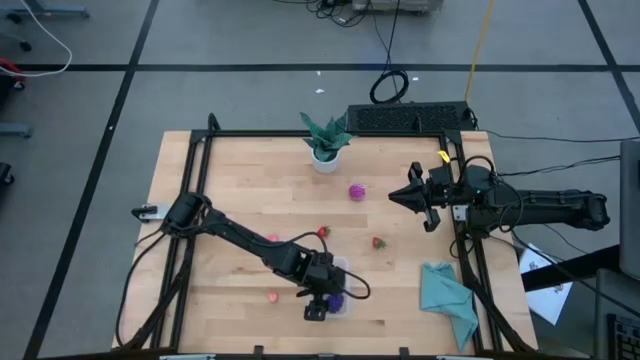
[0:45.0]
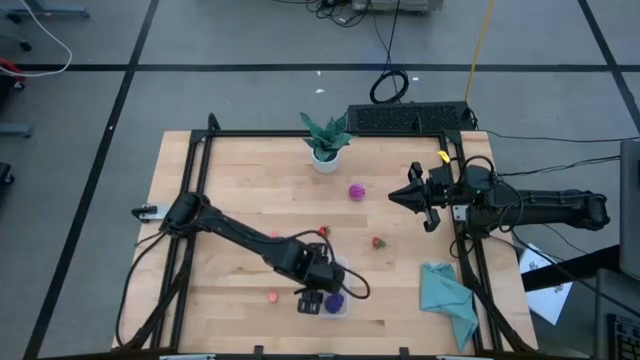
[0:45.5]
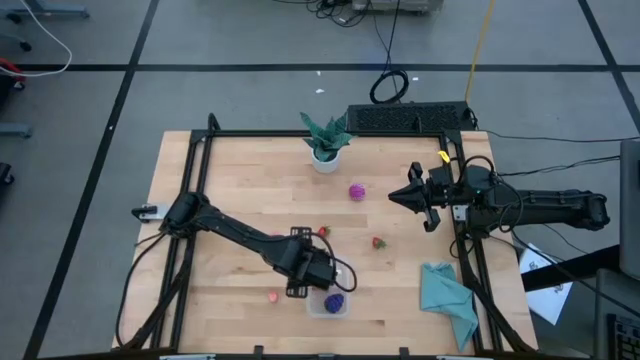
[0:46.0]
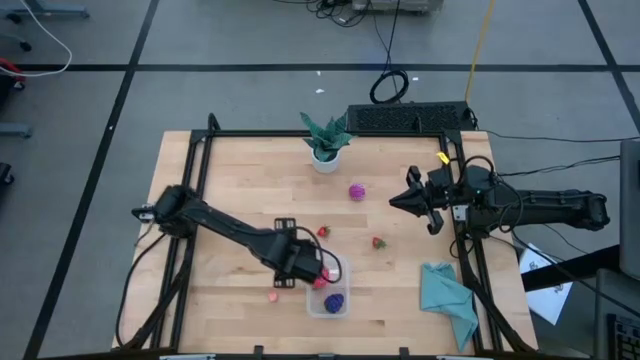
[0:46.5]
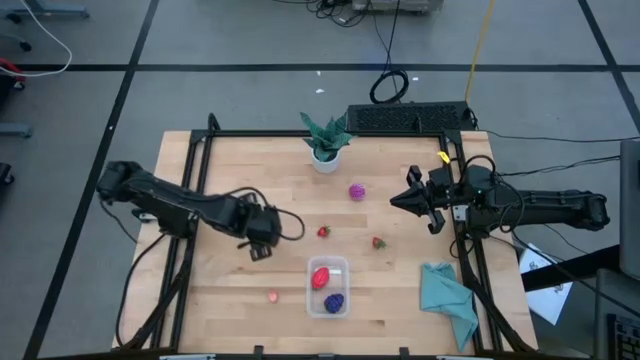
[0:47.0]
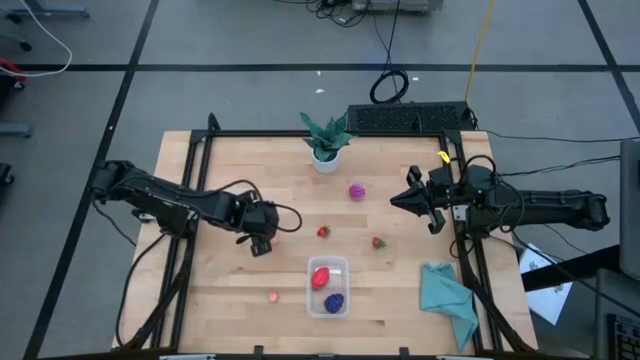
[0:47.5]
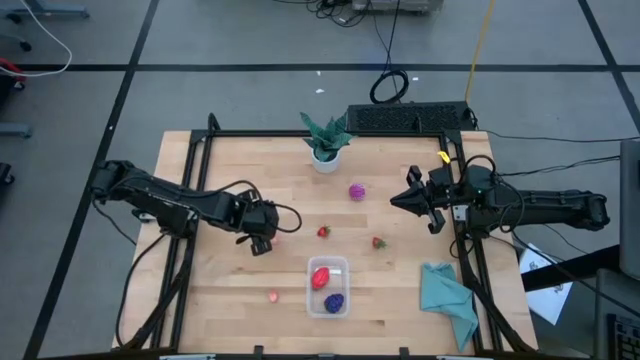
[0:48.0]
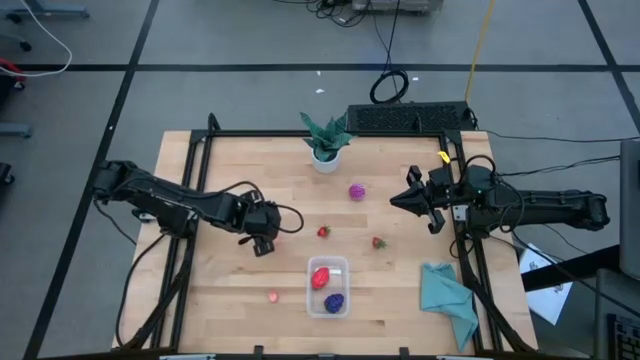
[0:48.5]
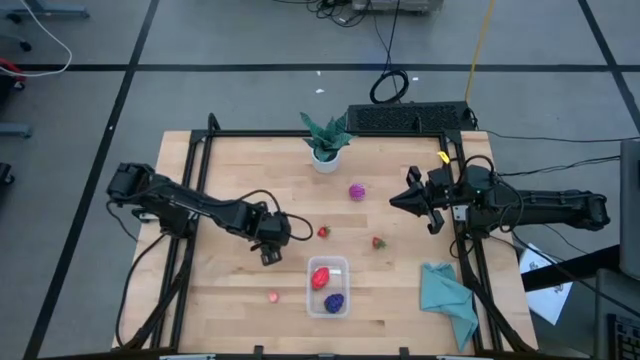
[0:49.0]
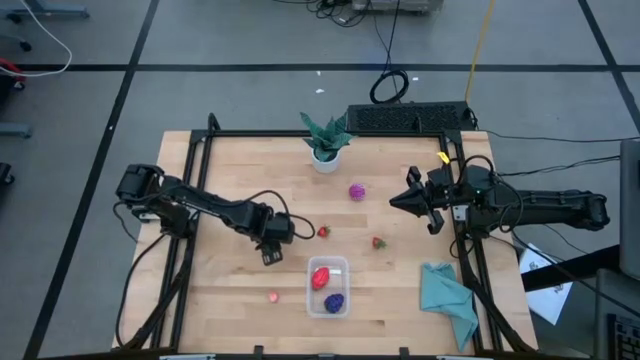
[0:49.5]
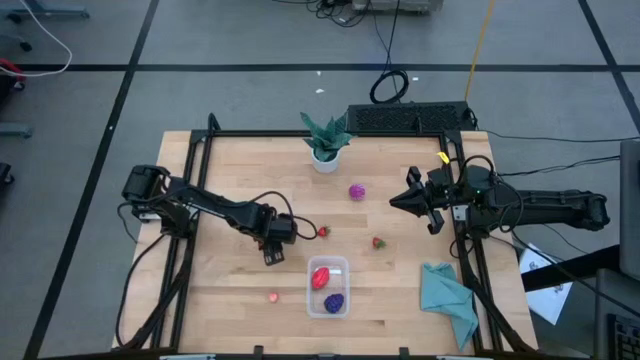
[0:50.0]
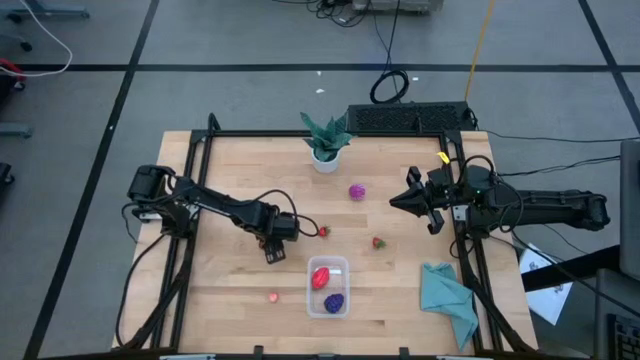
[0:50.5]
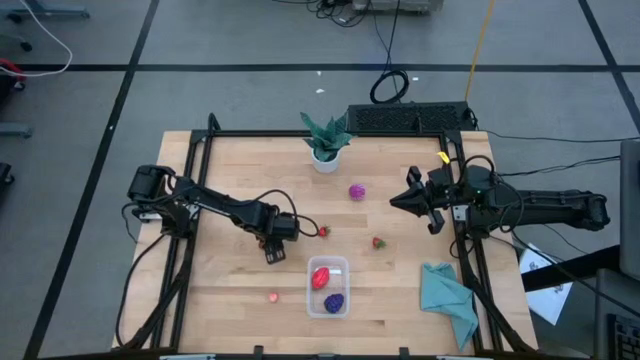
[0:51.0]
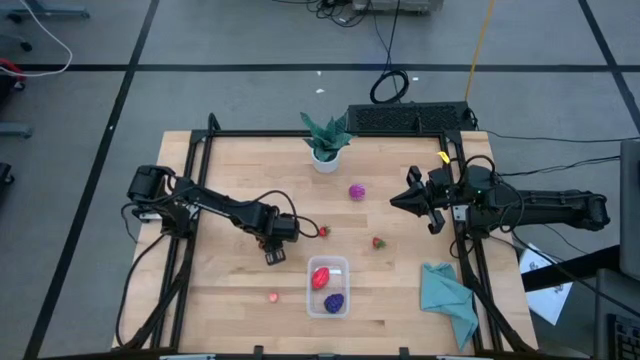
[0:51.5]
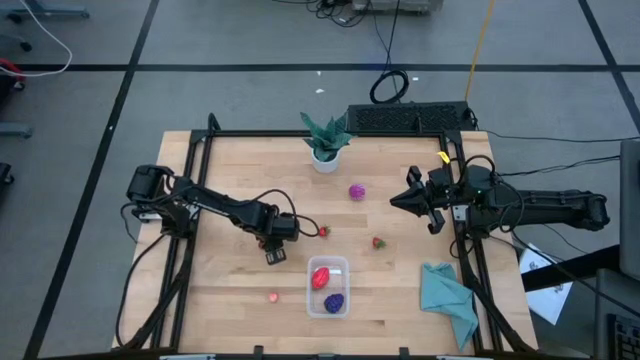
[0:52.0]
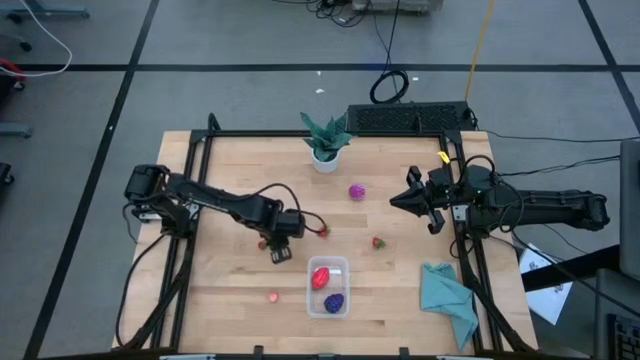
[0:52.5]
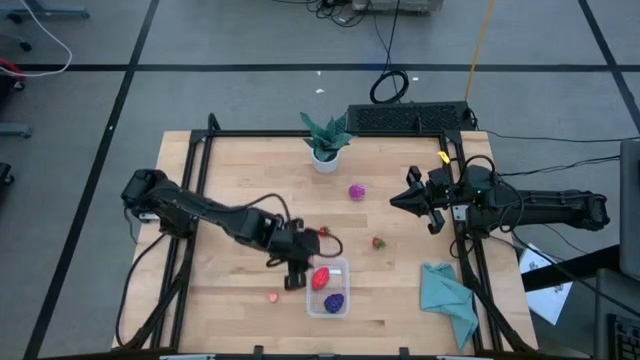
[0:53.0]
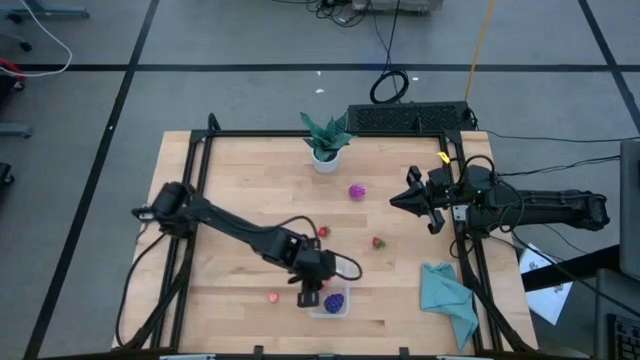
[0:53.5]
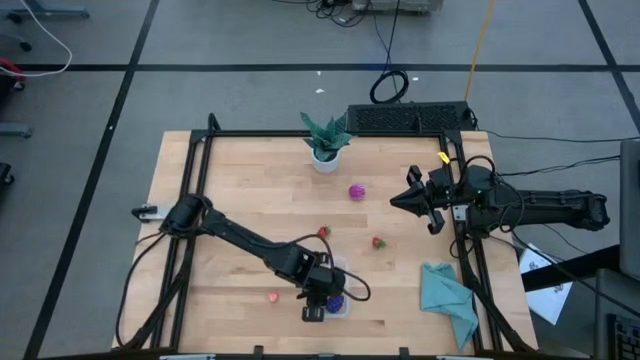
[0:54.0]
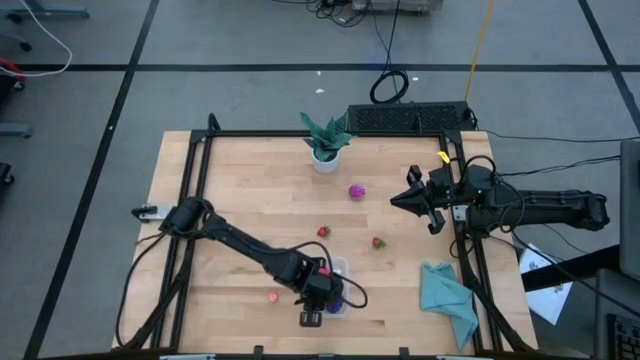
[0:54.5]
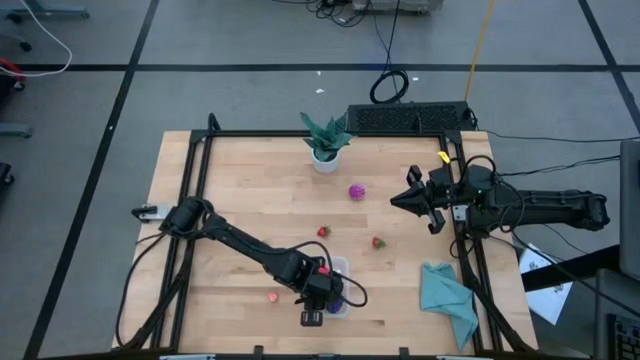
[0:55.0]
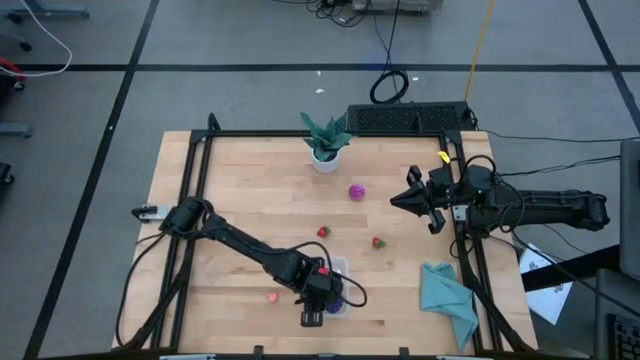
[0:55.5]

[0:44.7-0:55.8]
Task: Pick and placing Produce into tupperware
Put the top pink peach into the transparent container

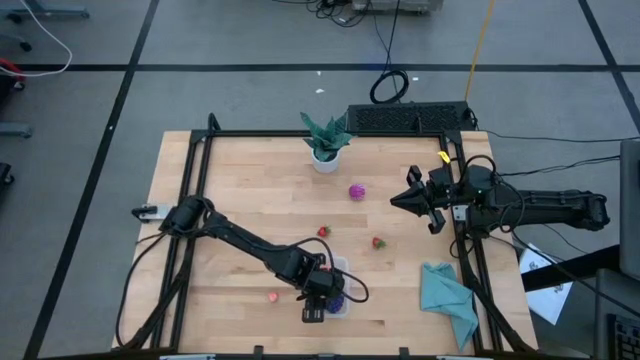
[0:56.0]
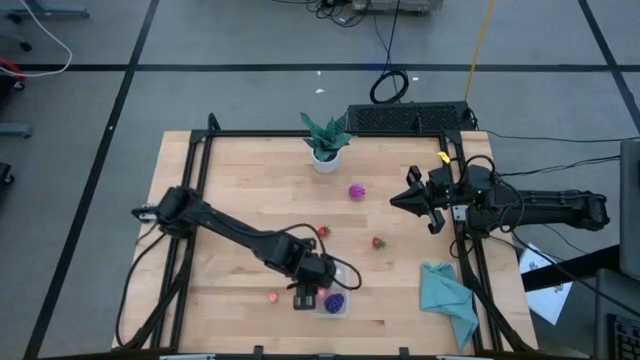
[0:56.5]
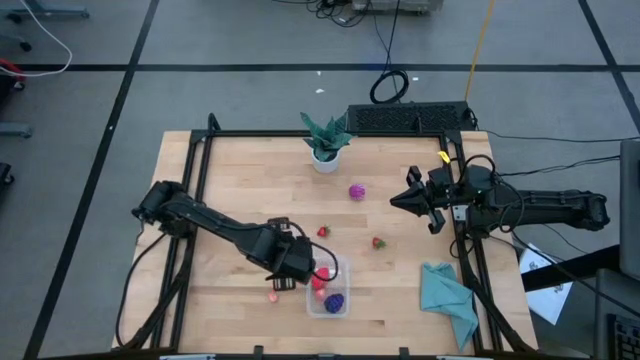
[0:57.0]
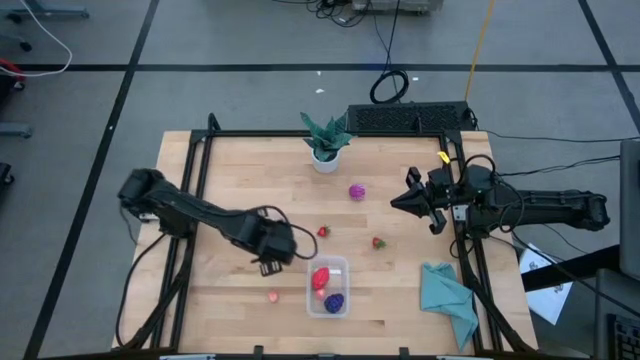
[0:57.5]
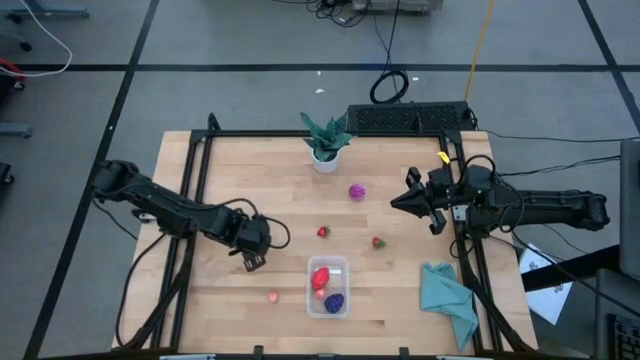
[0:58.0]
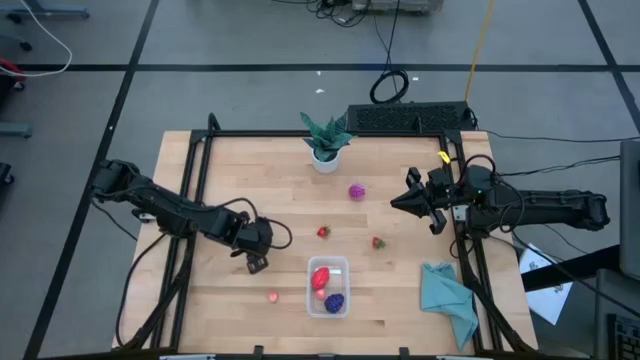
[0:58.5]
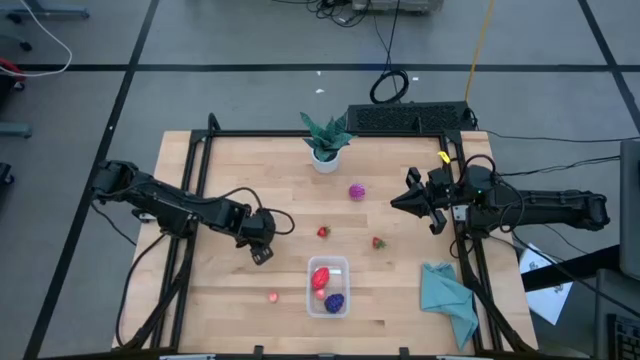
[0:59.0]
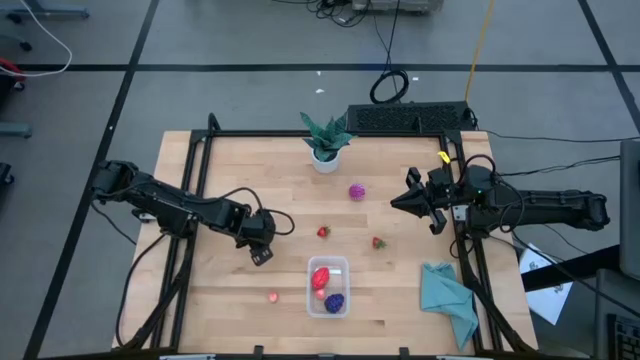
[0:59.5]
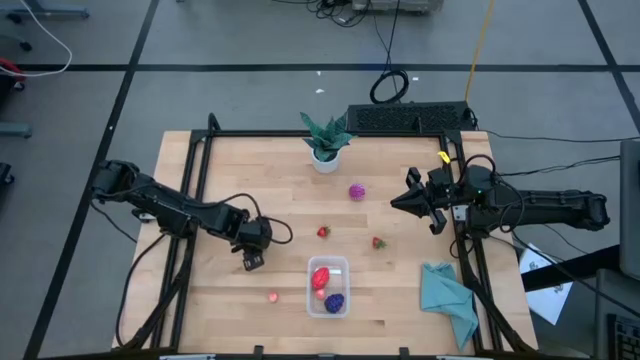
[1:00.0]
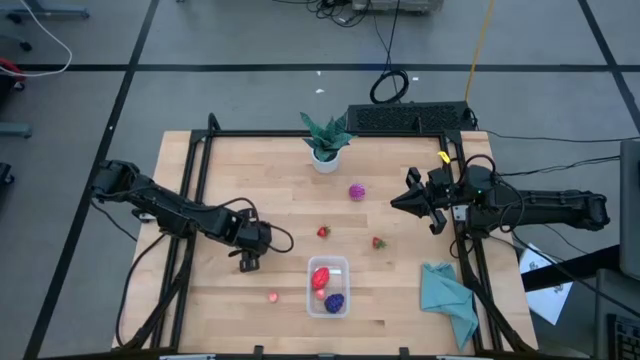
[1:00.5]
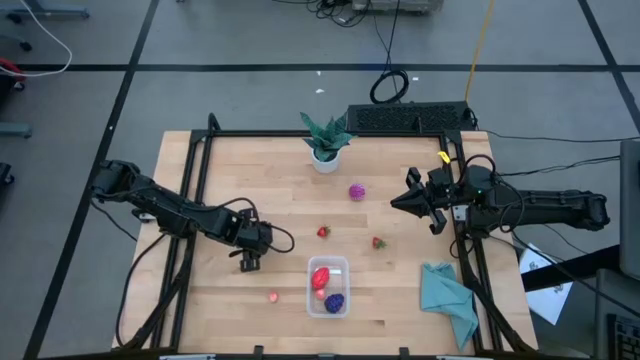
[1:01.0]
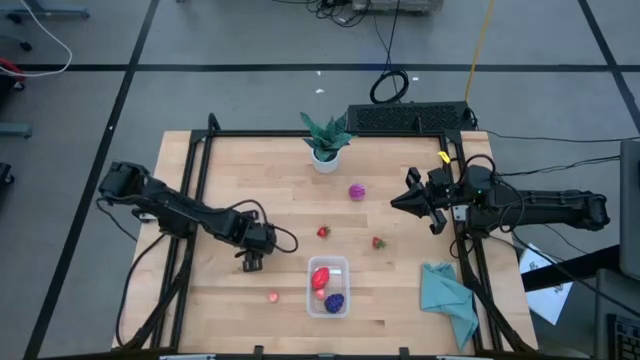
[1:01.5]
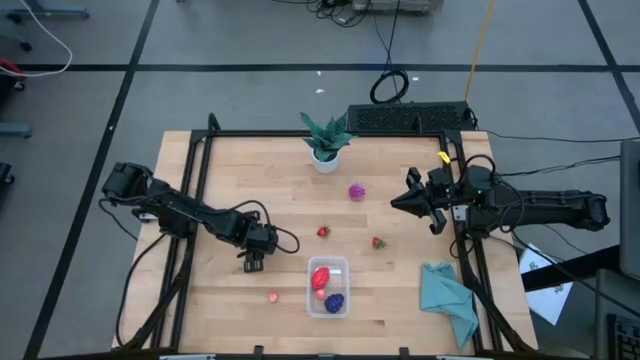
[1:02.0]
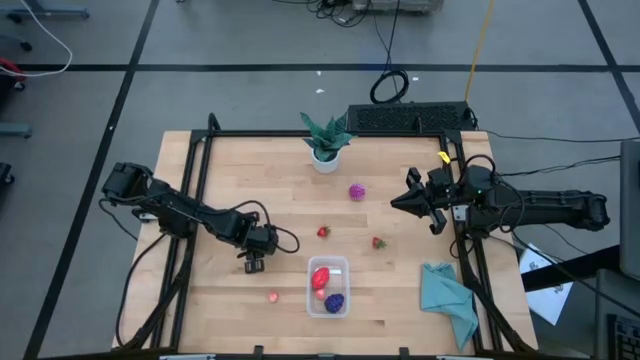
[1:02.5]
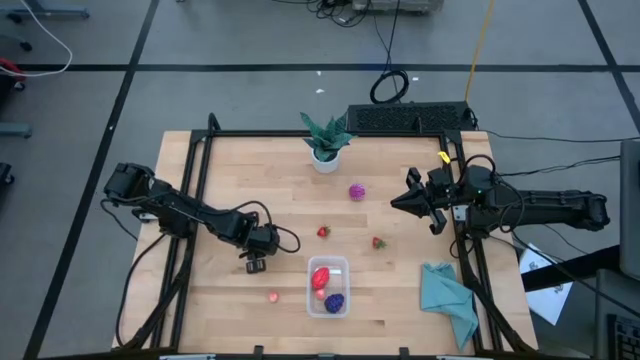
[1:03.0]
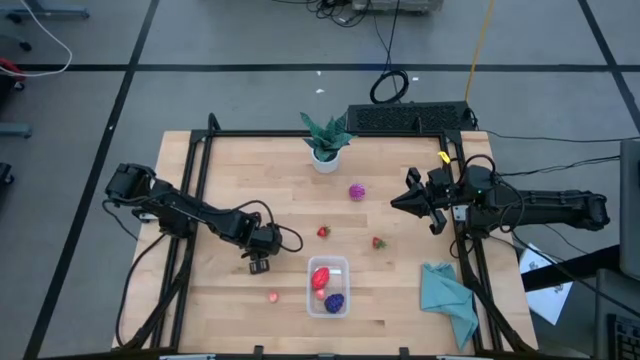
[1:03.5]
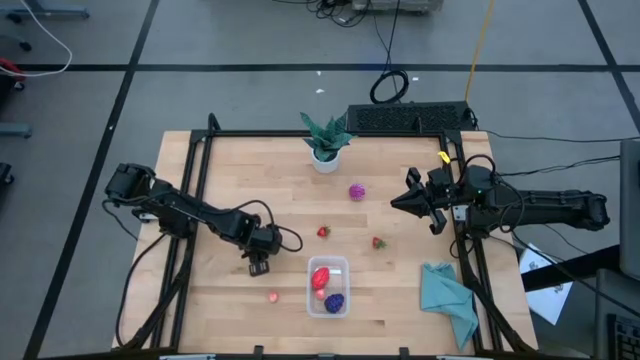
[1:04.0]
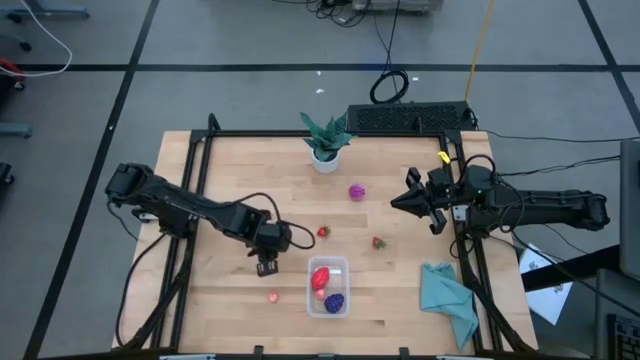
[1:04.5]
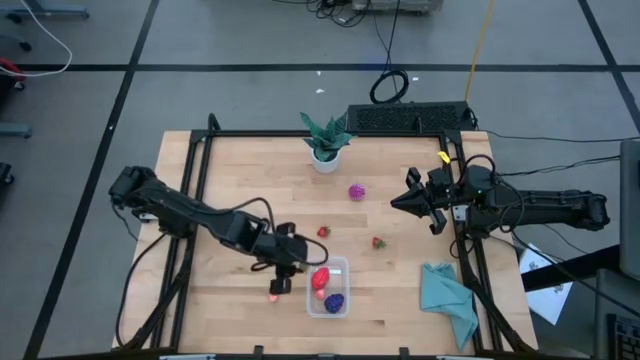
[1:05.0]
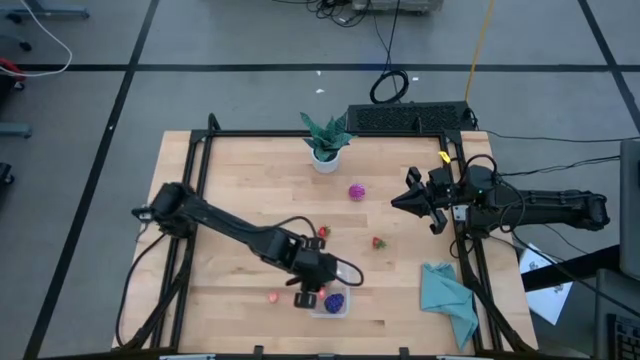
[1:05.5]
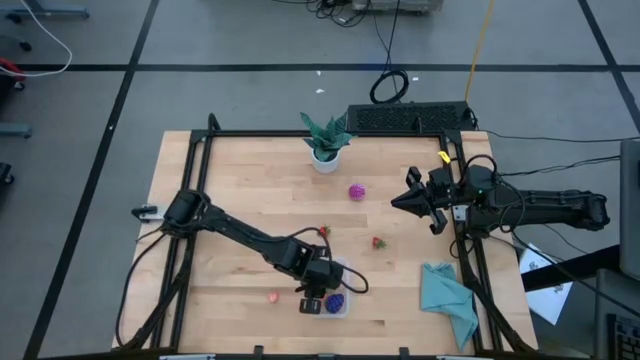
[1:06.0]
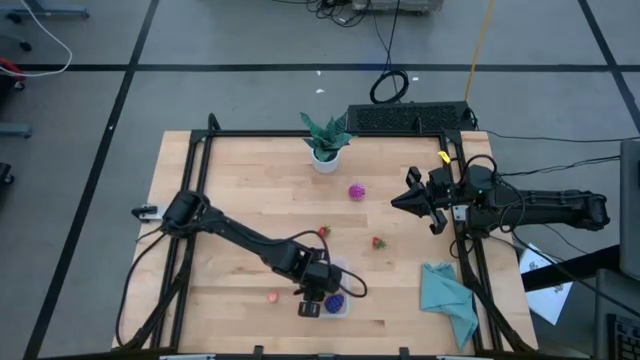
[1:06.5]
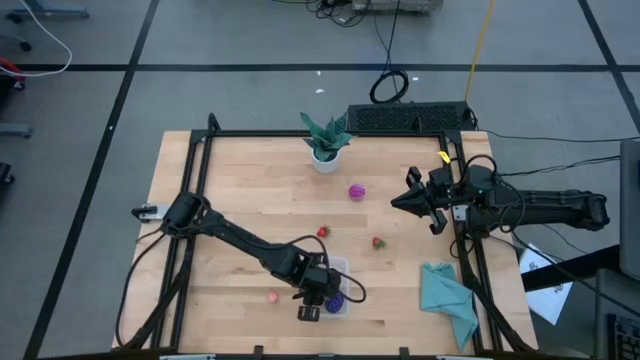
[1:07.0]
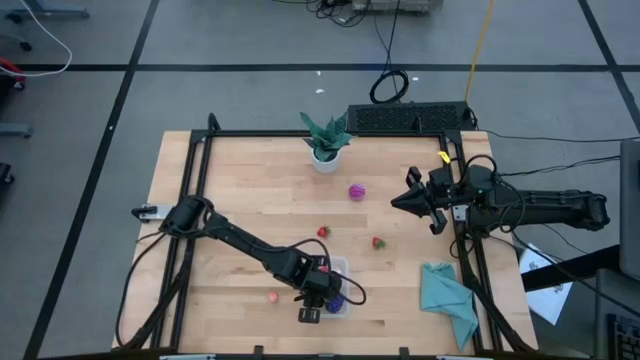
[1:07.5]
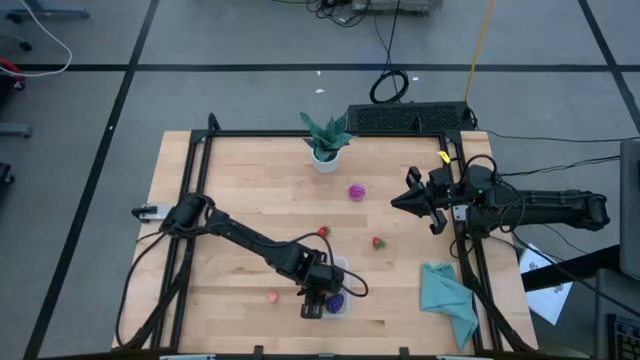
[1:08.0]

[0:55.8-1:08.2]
Put the left red strawberry into the transparent container
